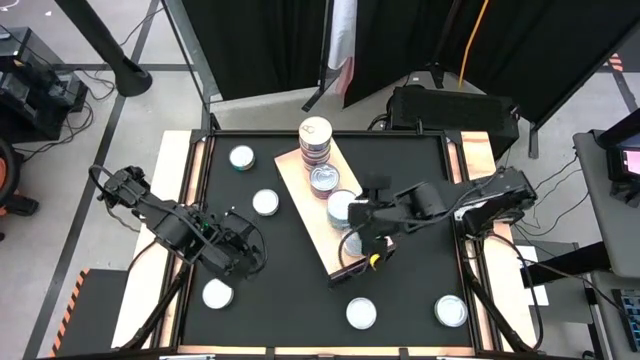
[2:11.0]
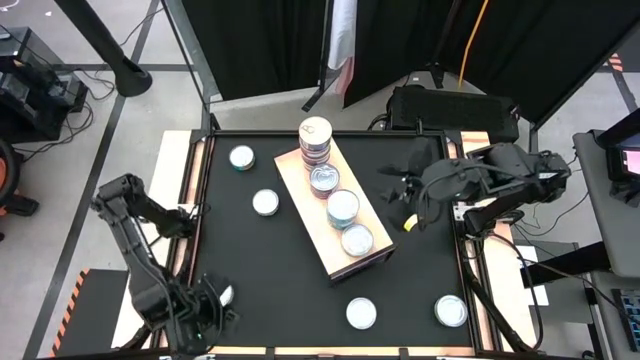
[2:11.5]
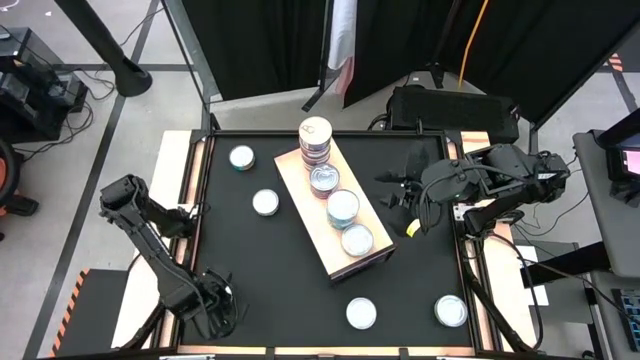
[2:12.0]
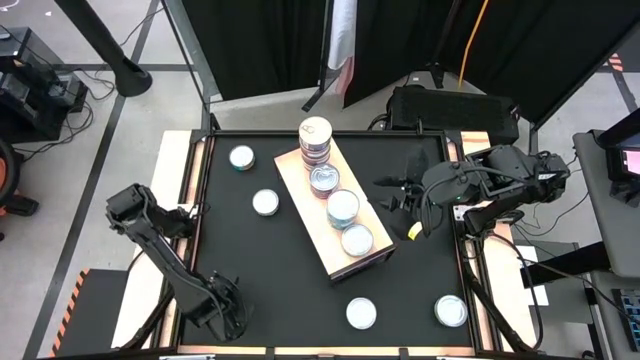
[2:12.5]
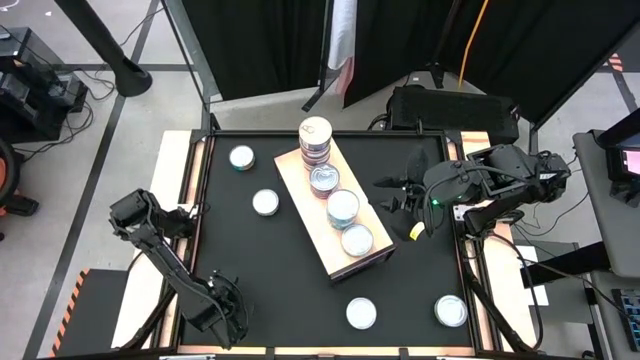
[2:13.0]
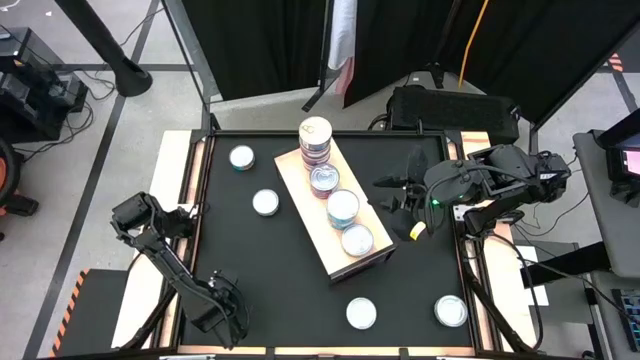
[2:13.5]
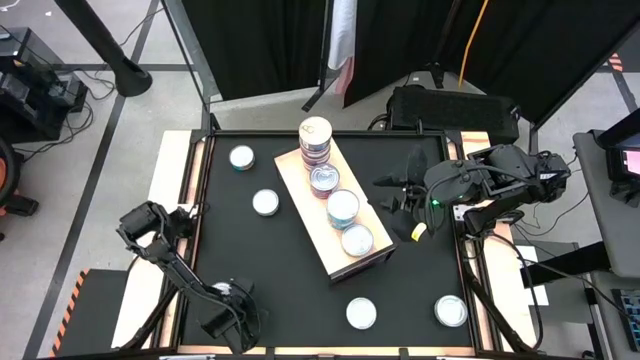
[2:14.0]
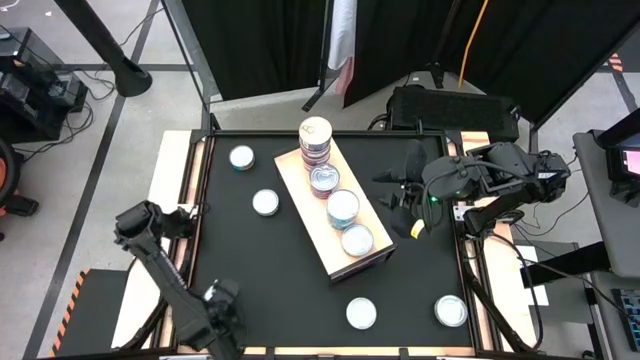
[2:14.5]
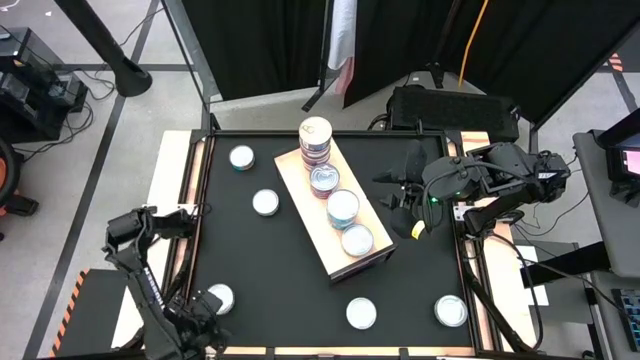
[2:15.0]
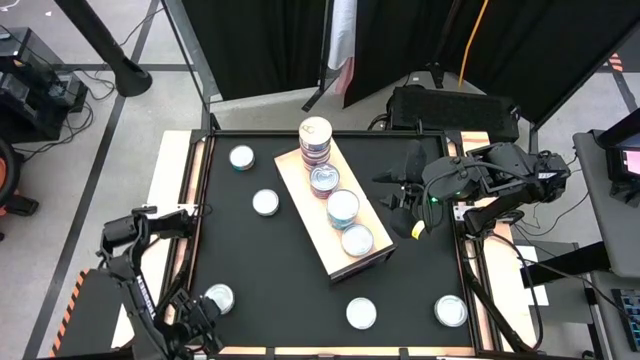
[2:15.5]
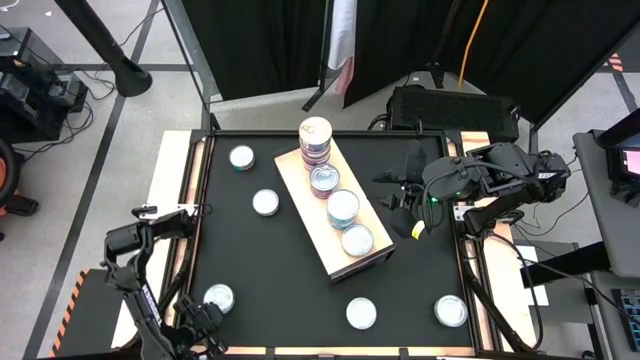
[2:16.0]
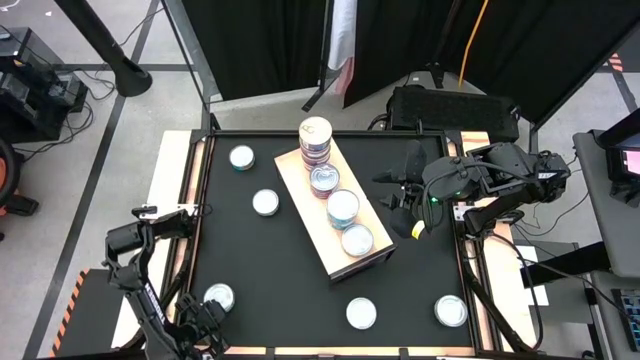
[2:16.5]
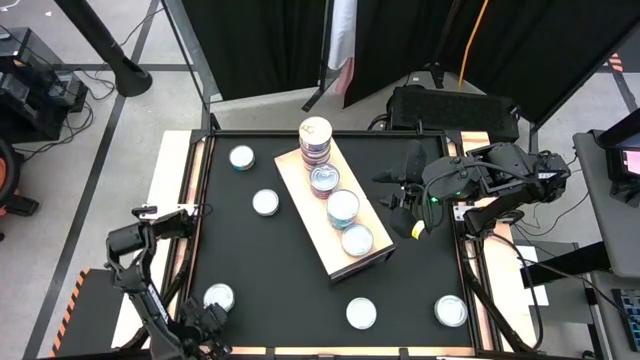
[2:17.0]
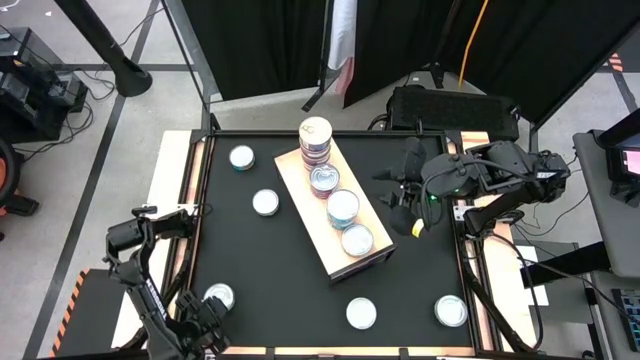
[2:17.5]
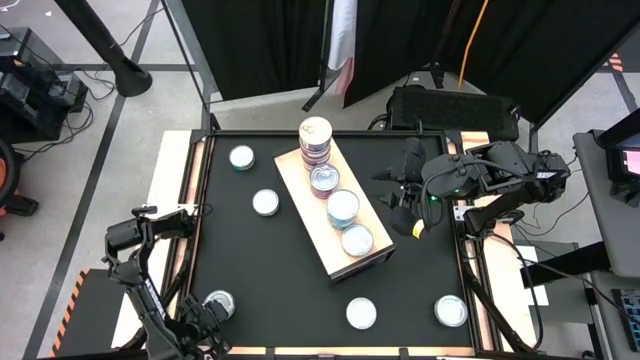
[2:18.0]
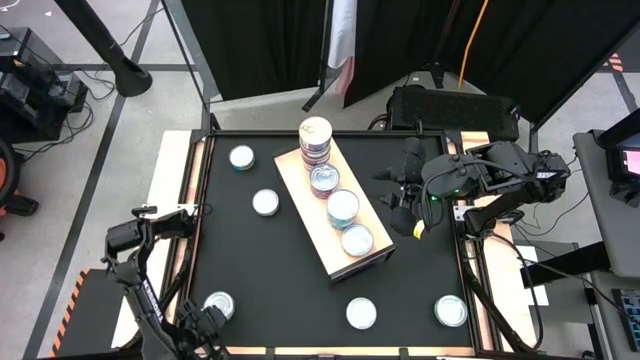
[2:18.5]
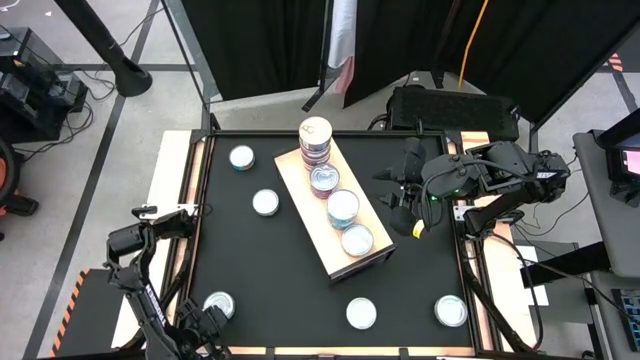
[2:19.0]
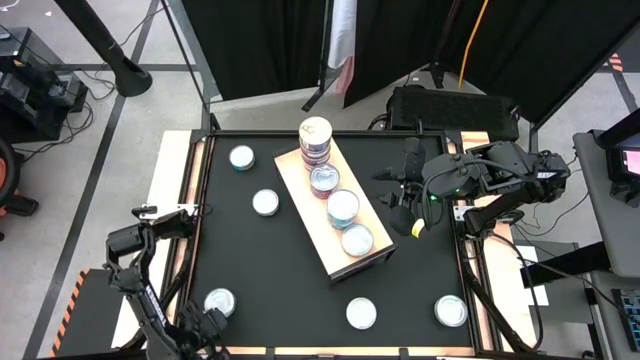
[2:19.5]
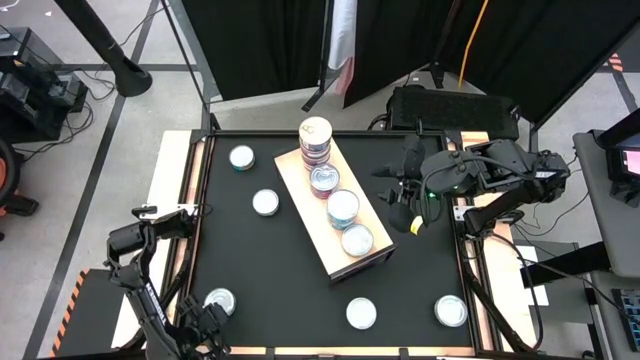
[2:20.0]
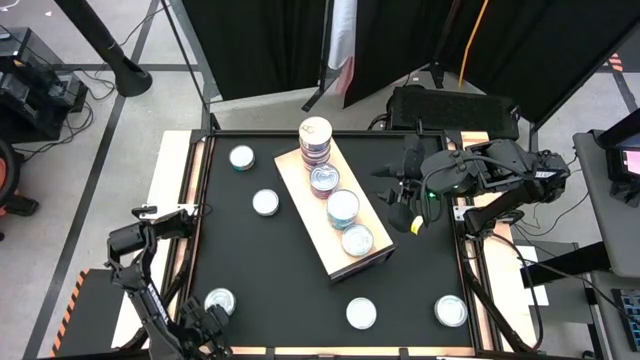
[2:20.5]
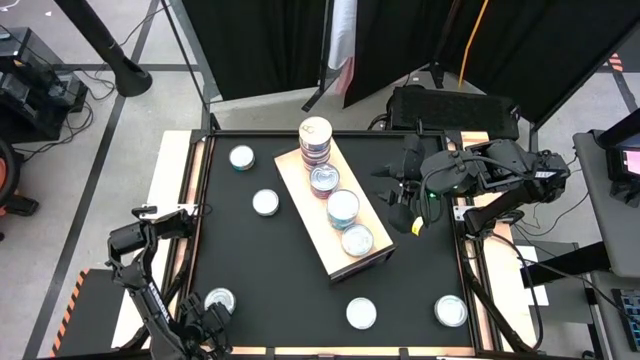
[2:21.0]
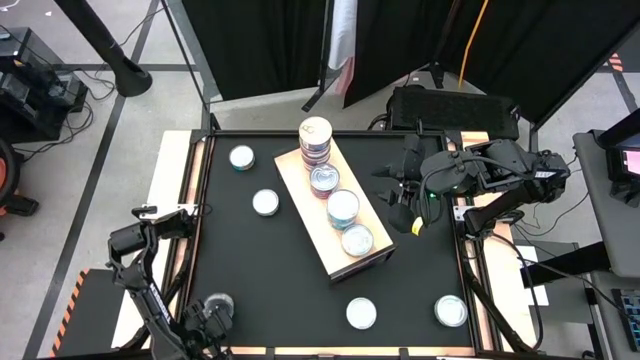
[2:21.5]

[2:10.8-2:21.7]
Task: Stack canned seafood by type on shelf
Stack the green tuna can on top of the green tuna can on the shelf

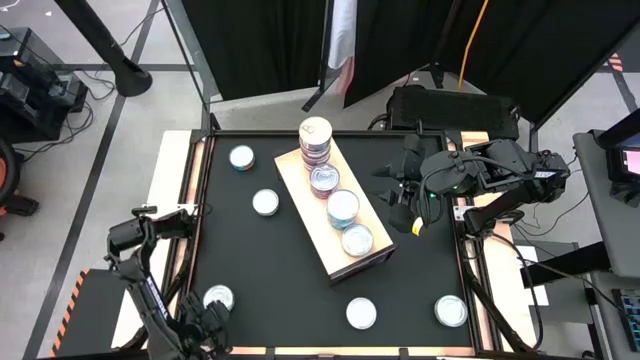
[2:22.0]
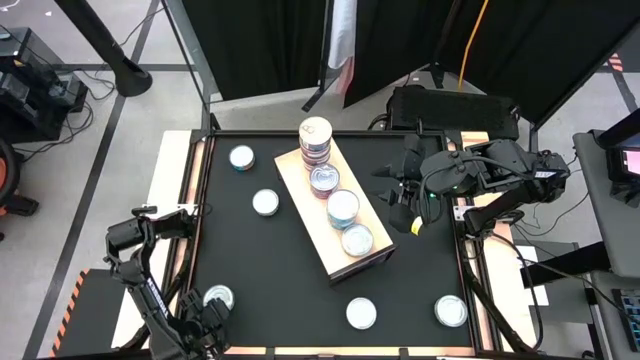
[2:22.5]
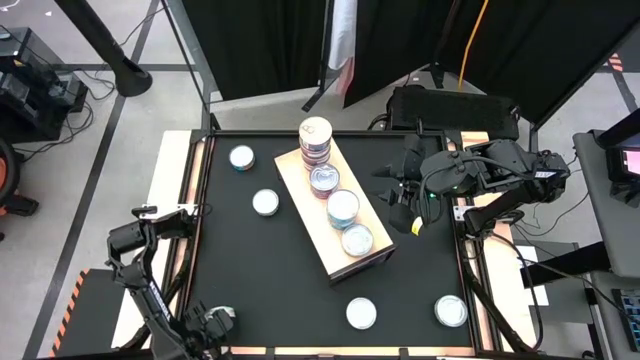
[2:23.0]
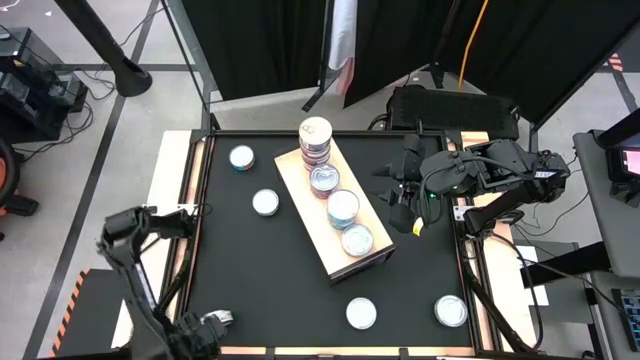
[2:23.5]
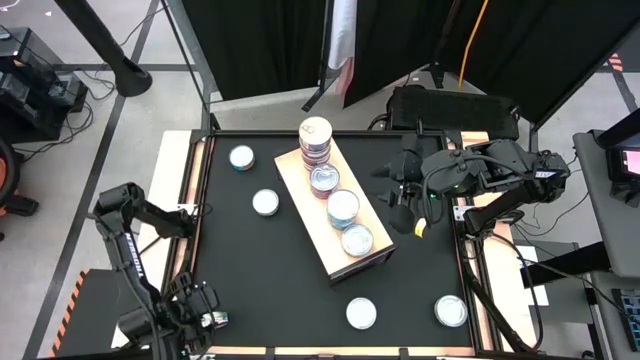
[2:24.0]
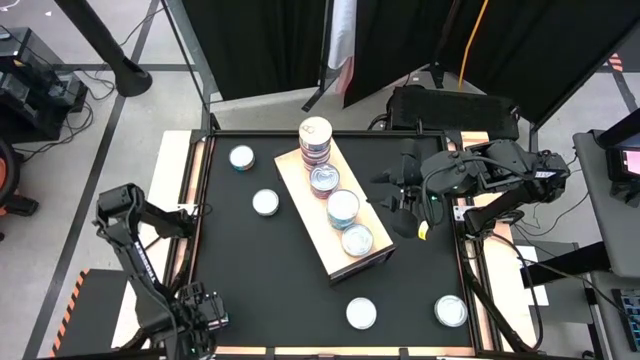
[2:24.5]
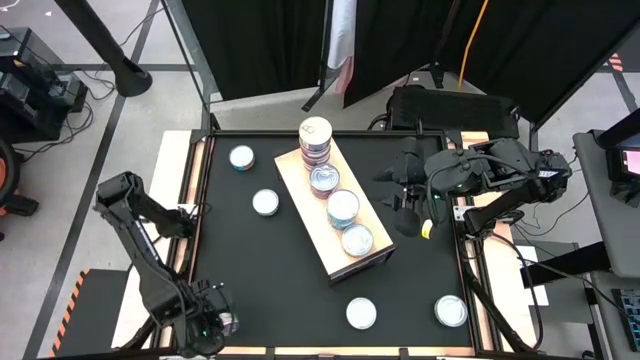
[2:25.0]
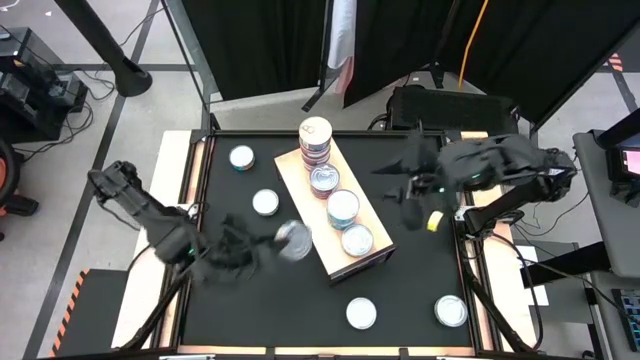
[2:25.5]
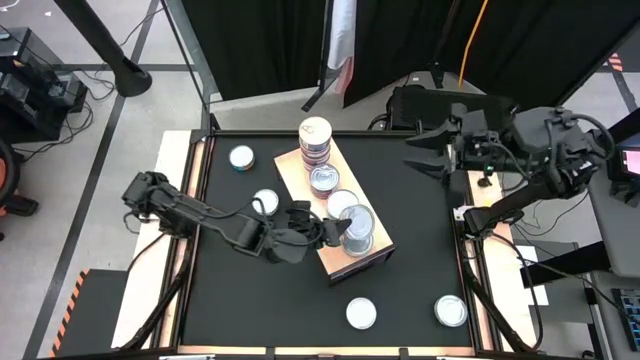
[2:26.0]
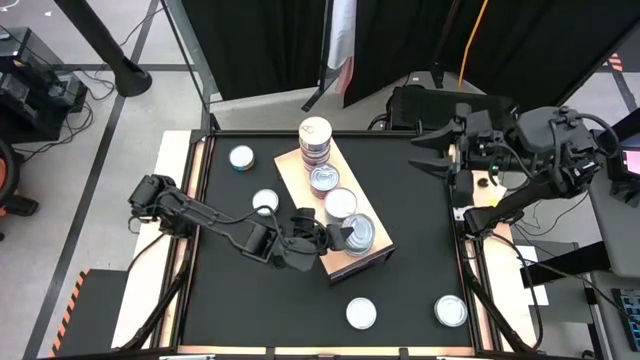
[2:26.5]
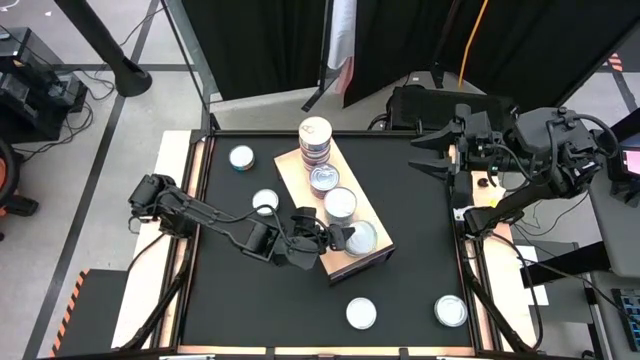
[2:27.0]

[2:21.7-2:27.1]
Stack the green tuna can on top of the green tuna can on the shelf

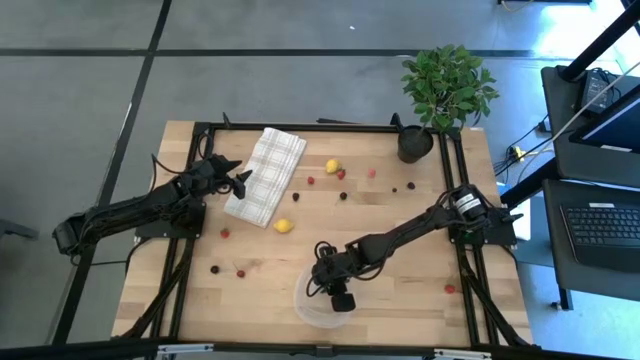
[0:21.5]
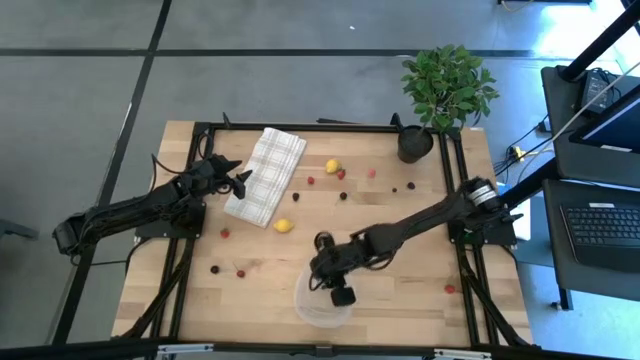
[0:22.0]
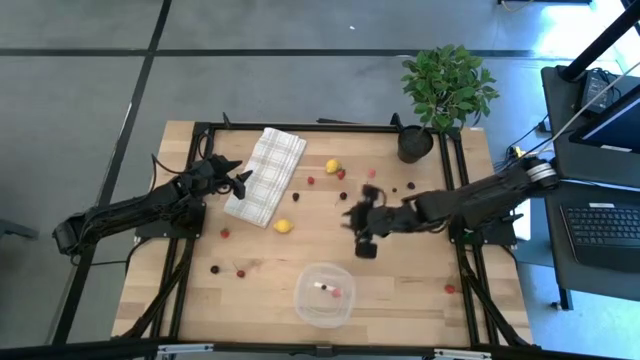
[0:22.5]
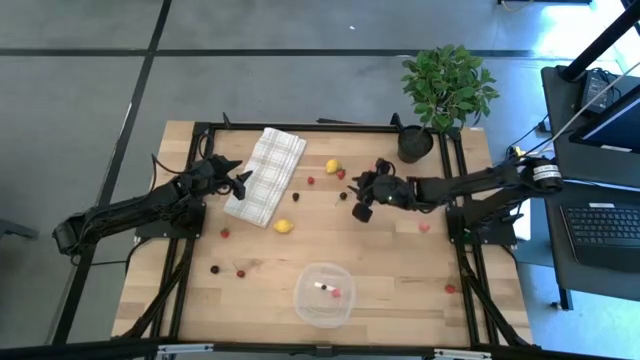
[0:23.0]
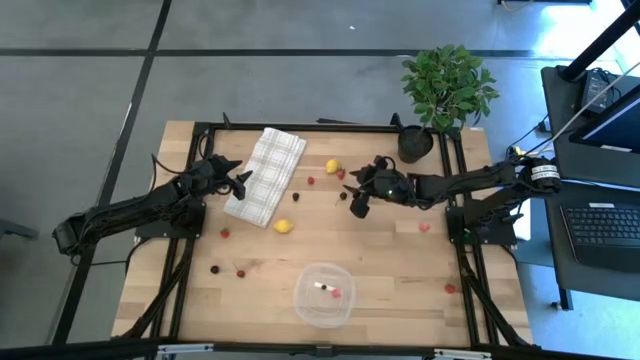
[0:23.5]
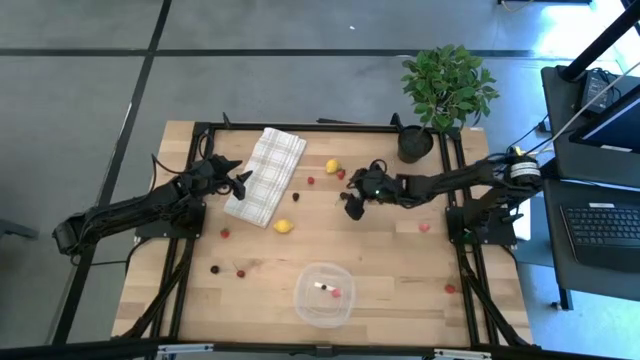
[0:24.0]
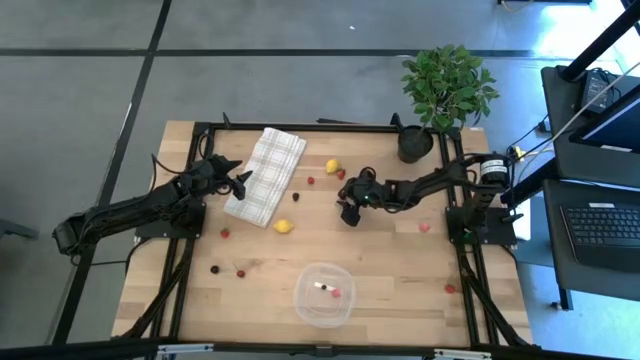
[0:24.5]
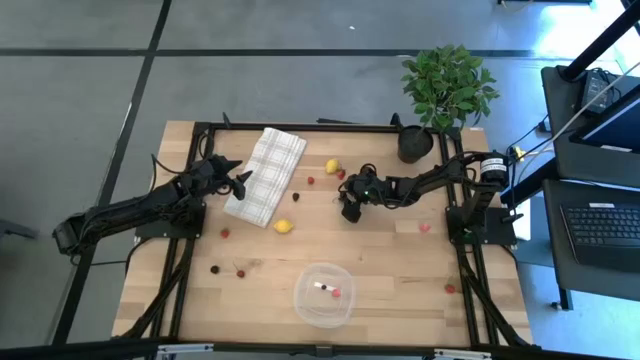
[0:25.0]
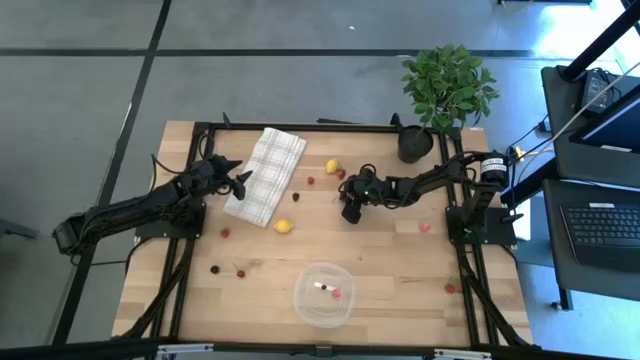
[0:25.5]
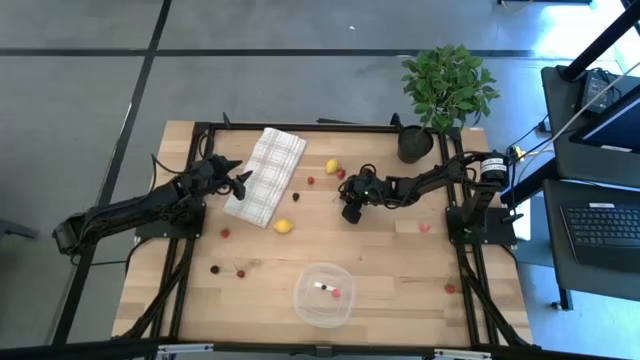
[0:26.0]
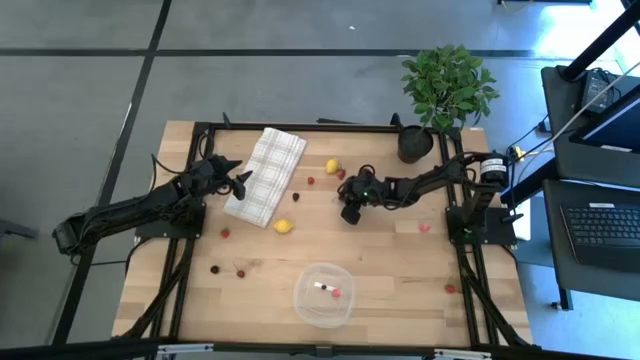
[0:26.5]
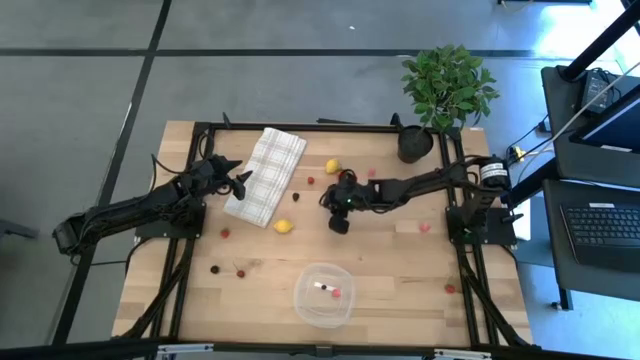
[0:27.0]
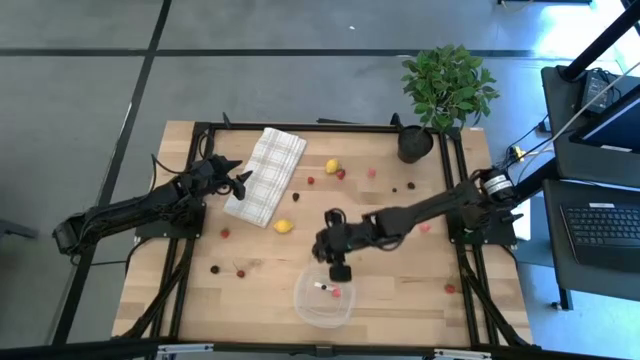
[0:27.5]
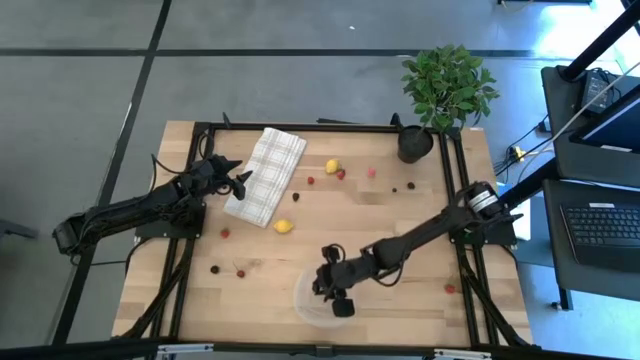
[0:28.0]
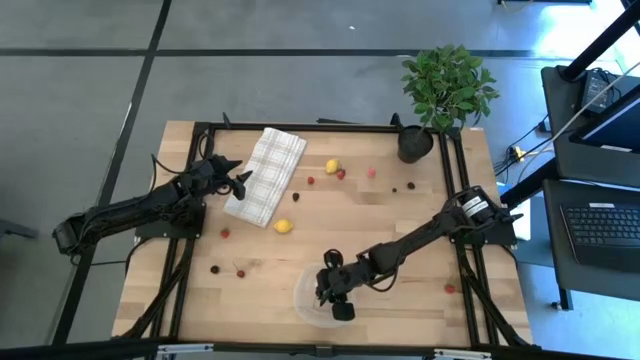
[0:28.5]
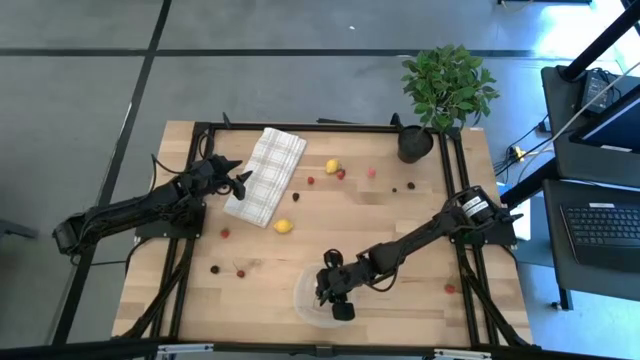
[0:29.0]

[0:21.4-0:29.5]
Task: Pick and placing Produce into tupperware
Put the top black cherry into the transparent bin
